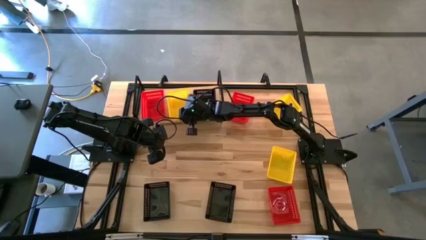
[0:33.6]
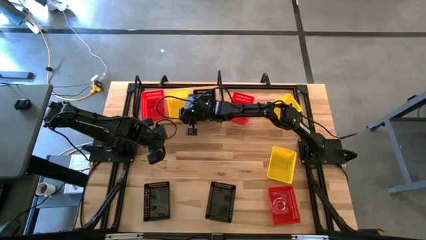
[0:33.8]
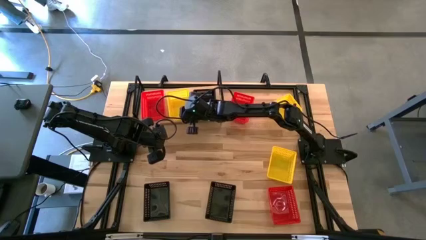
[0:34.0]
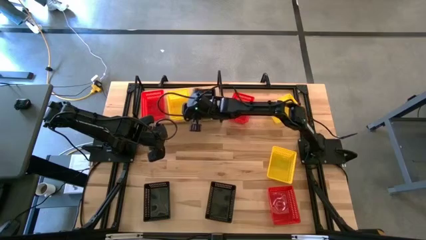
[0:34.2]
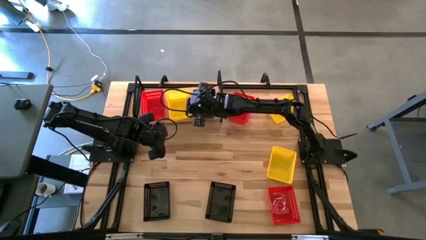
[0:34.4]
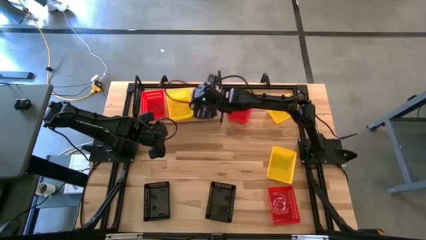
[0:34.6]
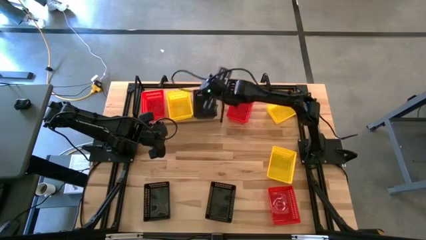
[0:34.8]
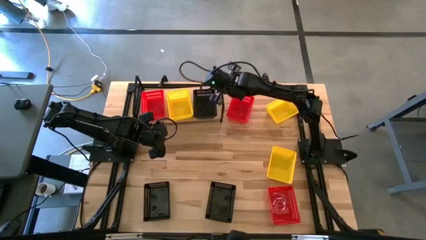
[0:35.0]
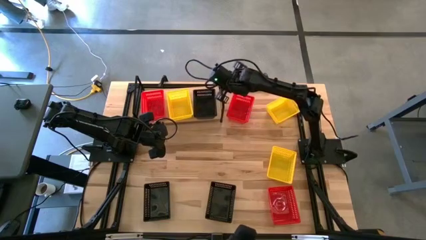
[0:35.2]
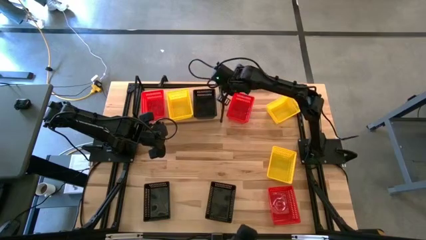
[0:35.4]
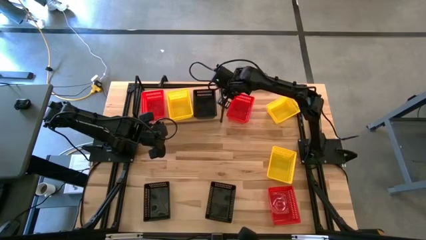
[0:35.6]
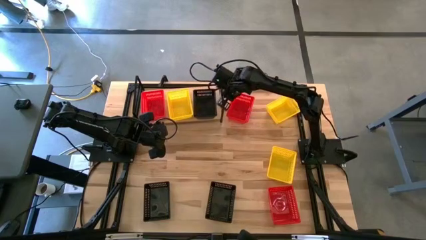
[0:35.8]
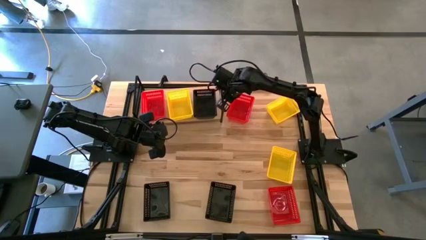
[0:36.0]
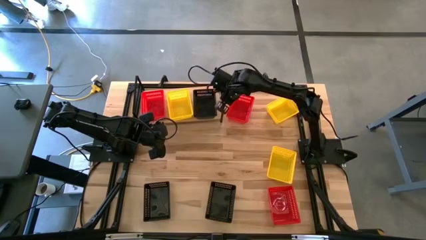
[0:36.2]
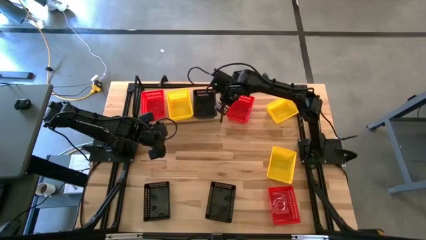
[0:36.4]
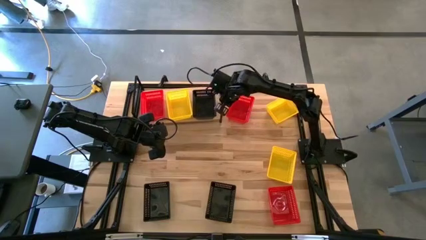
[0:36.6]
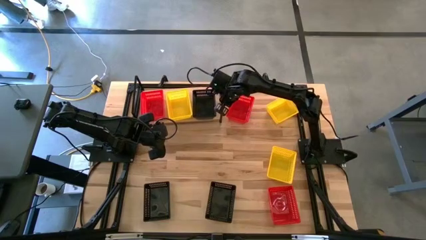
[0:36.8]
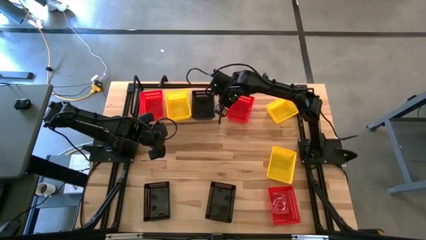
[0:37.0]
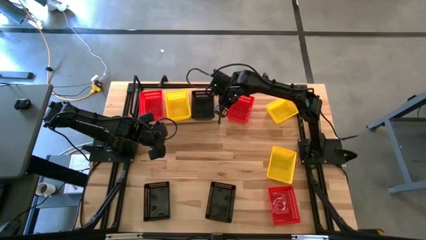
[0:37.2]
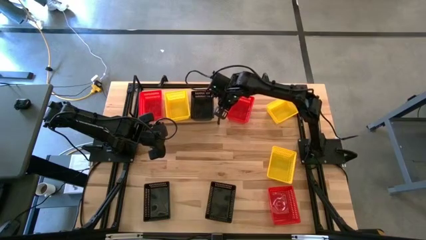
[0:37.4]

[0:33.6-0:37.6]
Task: Stack baskets on shelf by color
Adjust the shelf on the table

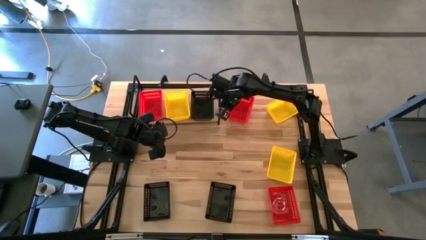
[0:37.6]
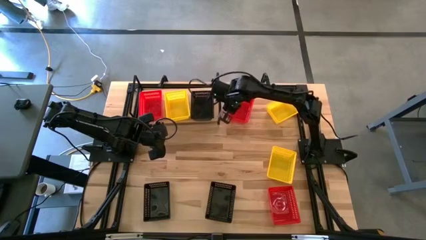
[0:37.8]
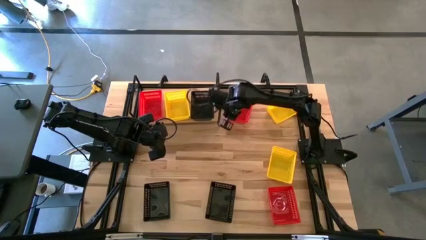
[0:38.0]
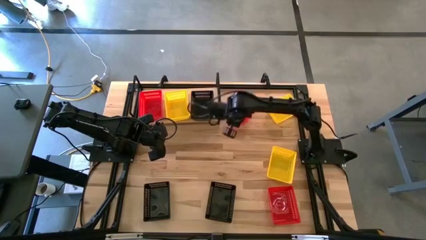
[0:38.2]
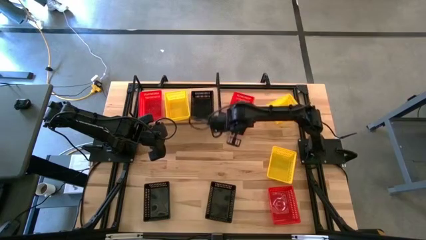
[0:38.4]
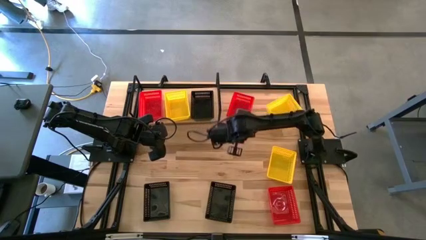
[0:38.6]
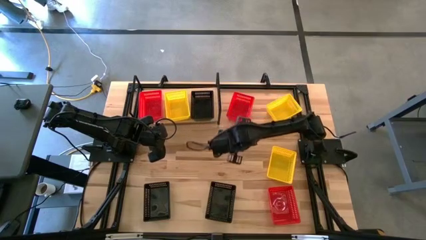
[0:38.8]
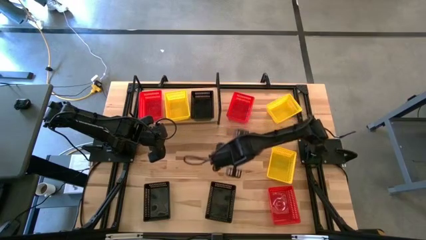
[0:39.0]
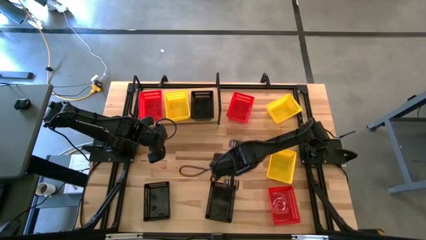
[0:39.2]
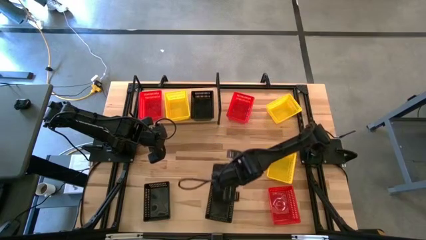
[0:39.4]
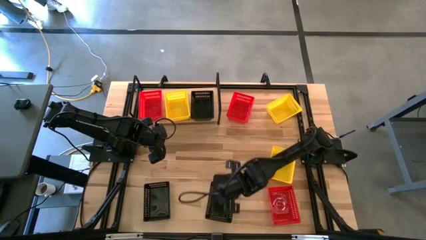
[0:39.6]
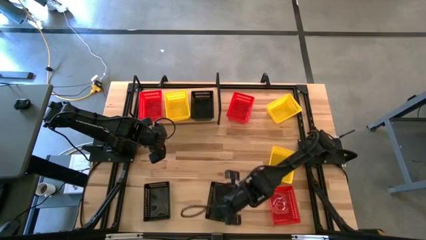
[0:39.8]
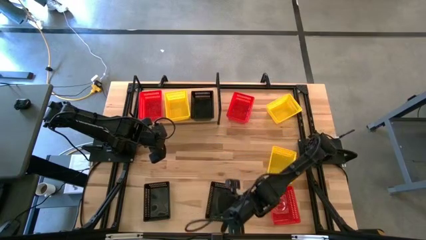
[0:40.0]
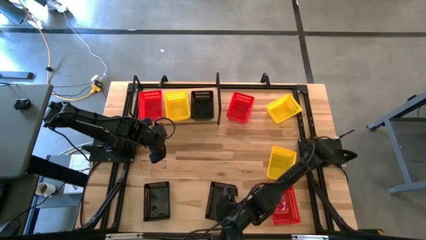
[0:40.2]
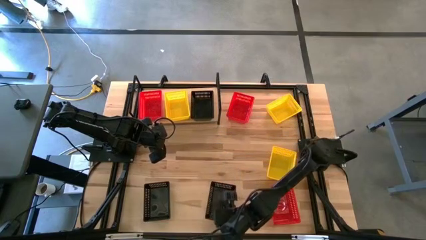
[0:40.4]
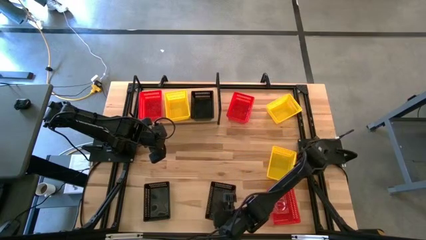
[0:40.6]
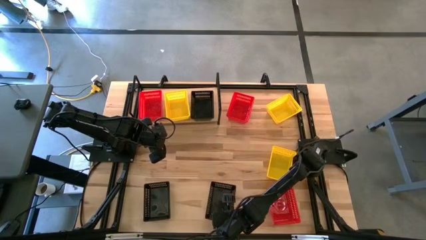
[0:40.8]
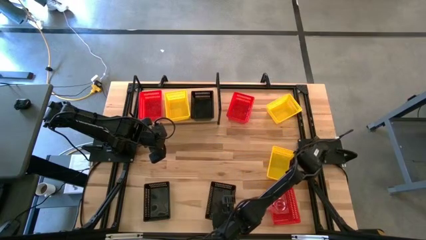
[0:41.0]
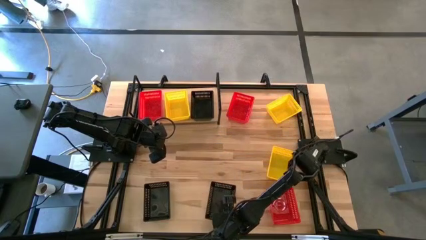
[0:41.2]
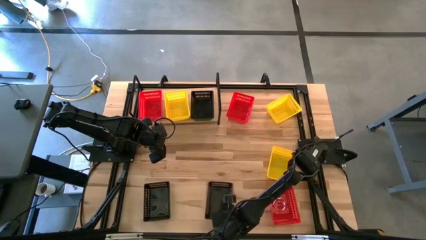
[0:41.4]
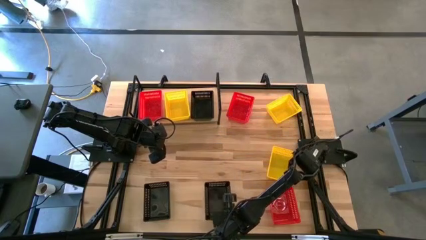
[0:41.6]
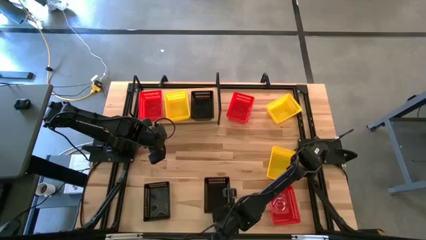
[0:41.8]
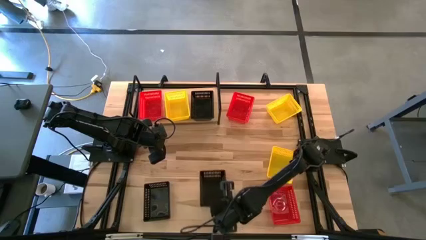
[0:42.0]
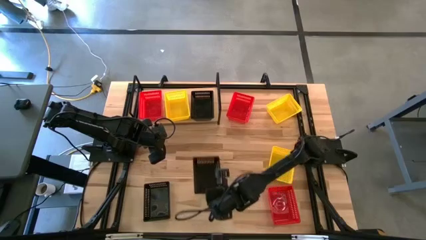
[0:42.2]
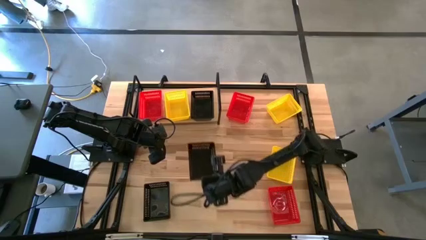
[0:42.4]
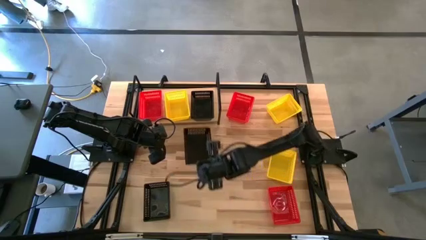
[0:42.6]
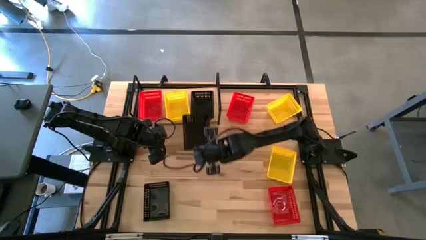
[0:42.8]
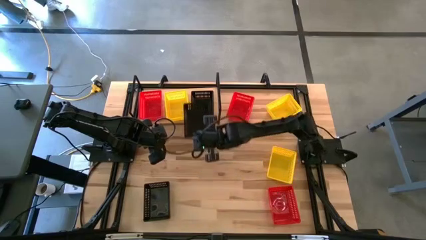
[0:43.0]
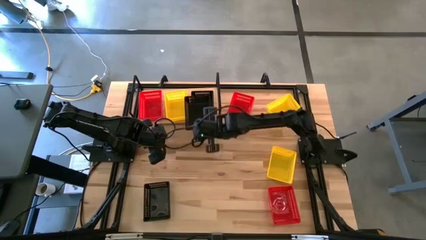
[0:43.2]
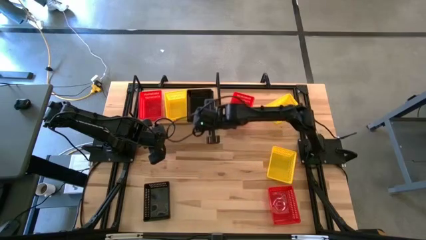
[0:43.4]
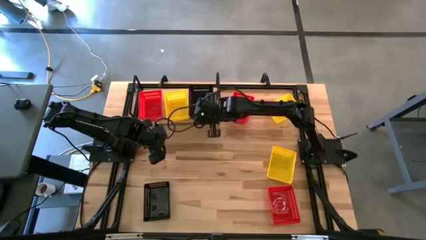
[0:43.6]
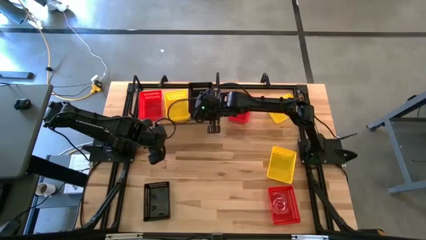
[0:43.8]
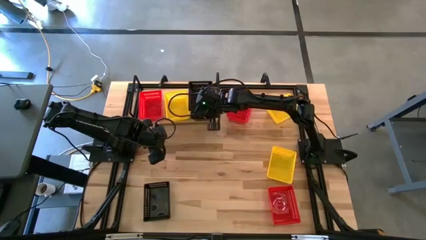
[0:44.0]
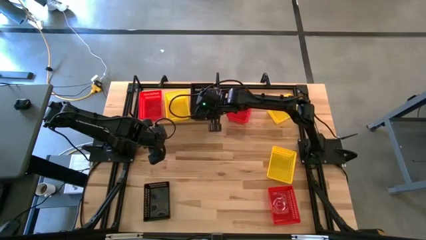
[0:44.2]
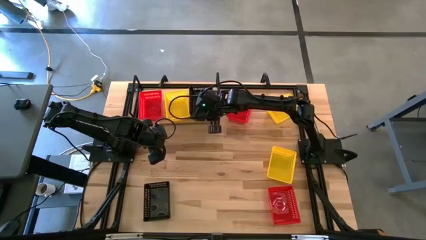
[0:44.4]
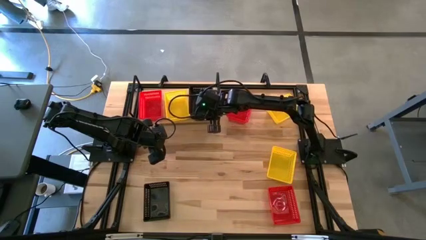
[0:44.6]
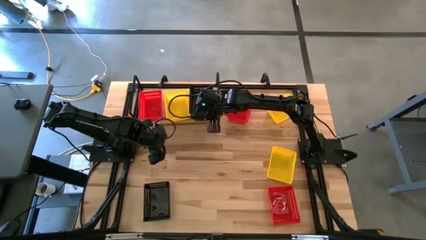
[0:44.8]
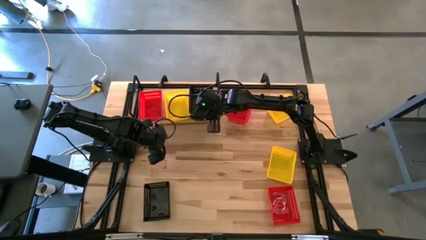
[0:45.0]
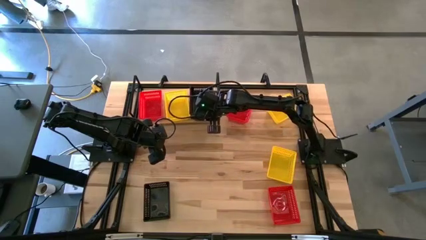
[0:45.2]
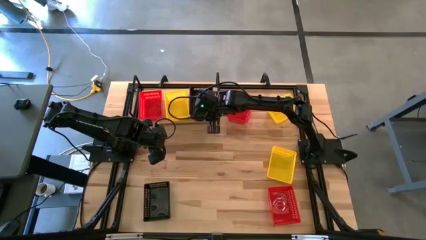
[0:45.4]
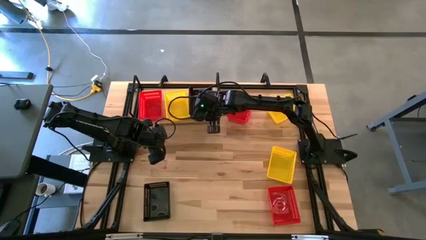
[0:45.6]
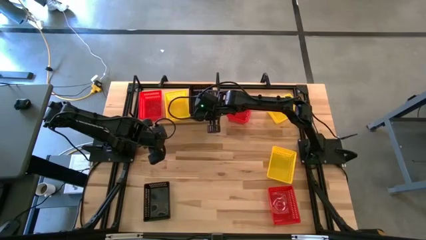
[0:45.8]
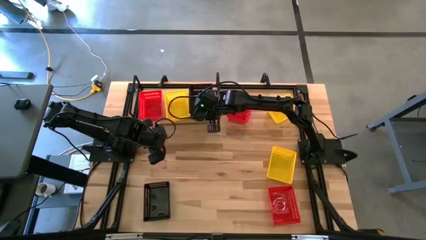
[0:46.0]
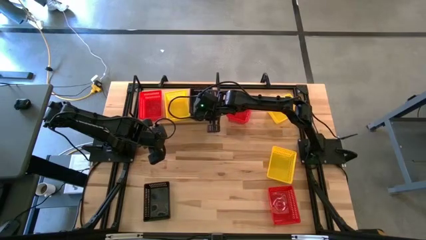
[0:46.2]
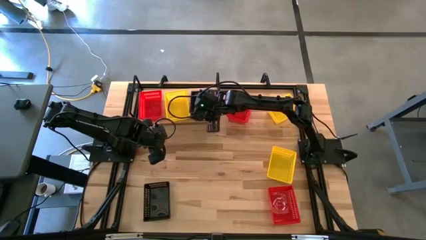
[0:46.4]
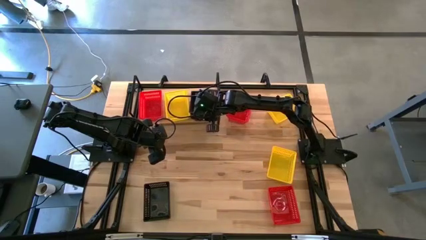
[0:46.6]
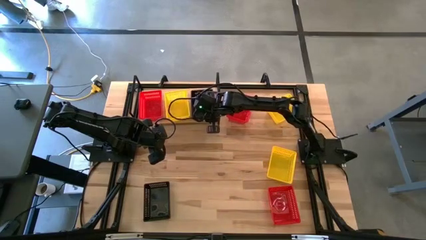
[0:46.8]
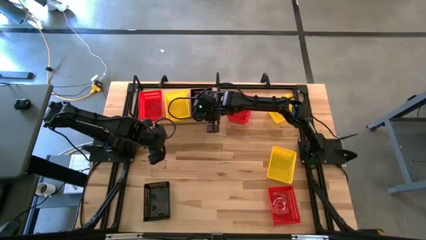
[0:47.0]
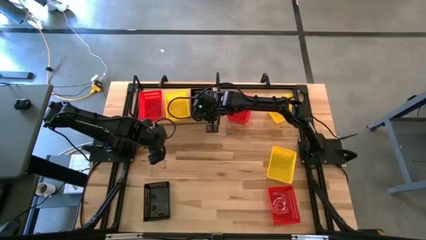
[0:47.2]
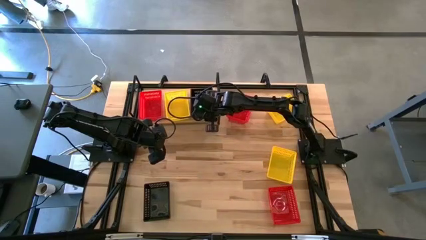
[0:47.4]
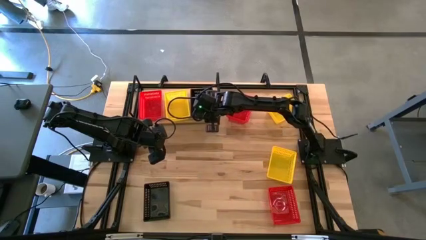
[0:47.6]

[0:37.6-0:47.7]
Stack the right black bin on top of the black bin on the shelf
